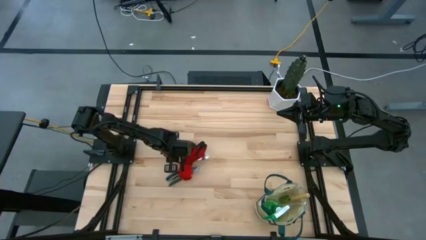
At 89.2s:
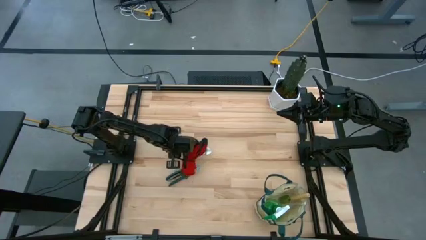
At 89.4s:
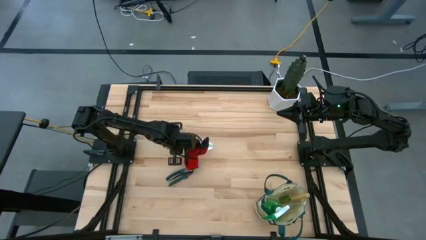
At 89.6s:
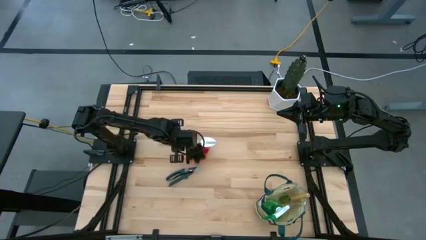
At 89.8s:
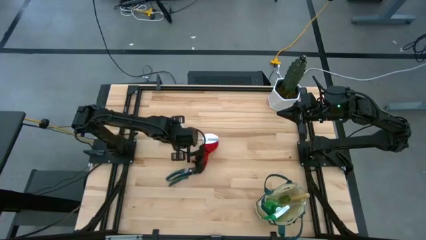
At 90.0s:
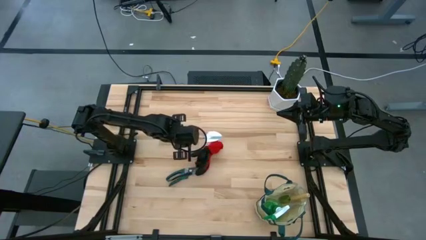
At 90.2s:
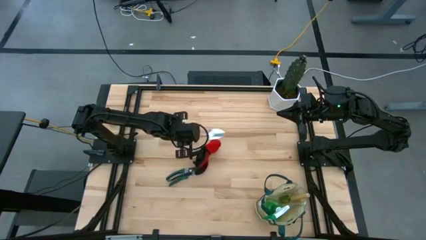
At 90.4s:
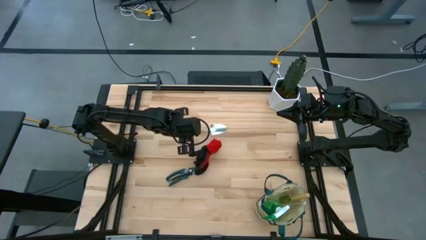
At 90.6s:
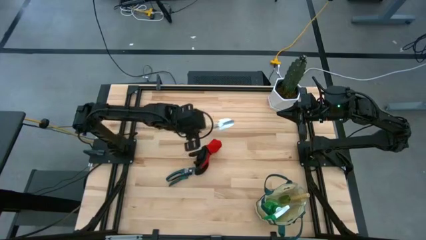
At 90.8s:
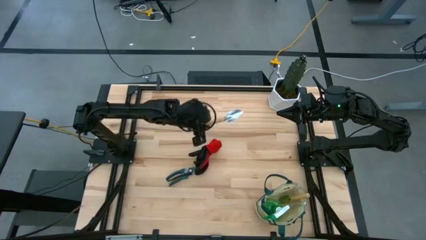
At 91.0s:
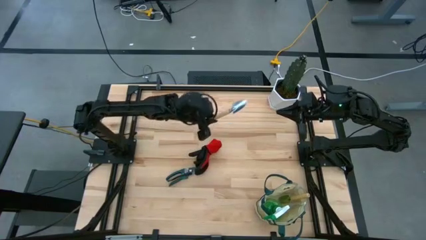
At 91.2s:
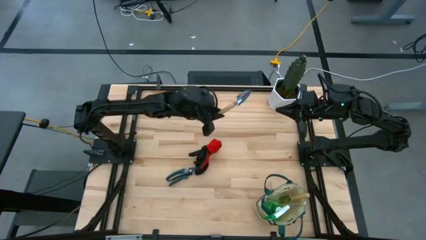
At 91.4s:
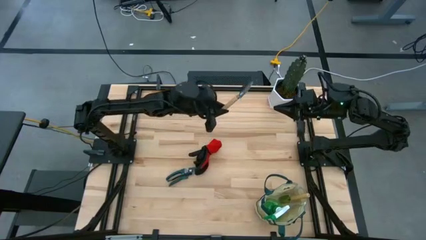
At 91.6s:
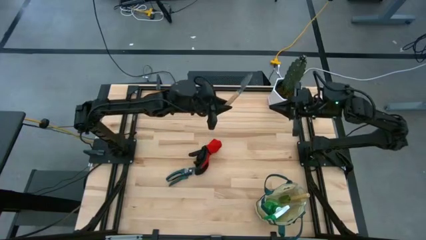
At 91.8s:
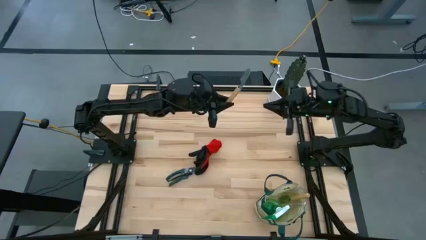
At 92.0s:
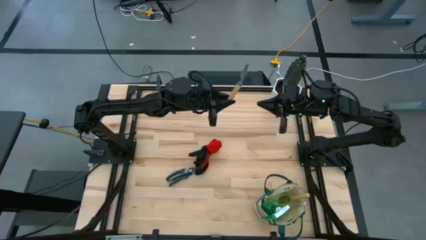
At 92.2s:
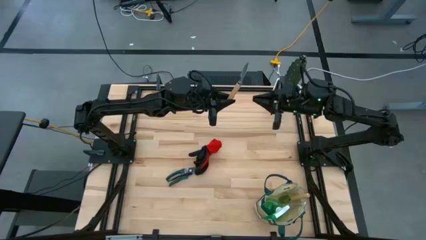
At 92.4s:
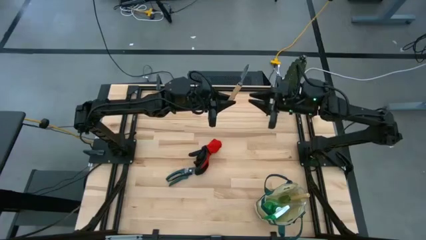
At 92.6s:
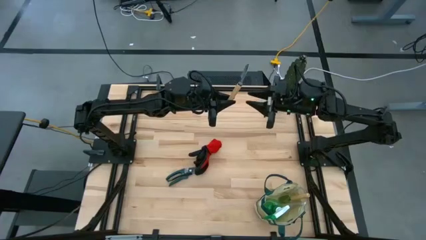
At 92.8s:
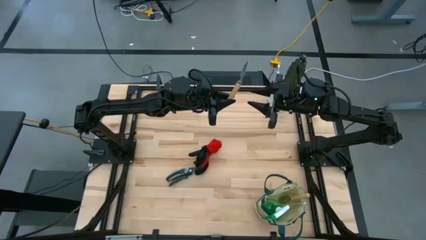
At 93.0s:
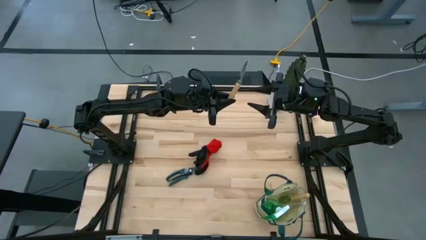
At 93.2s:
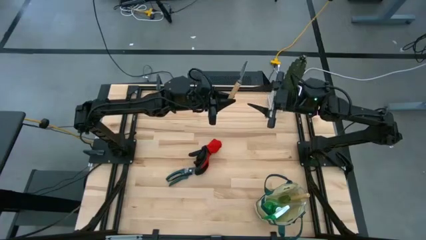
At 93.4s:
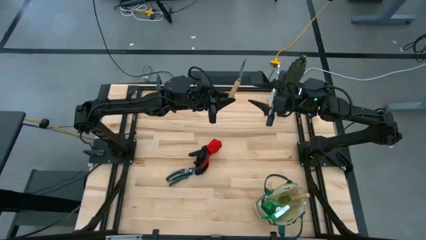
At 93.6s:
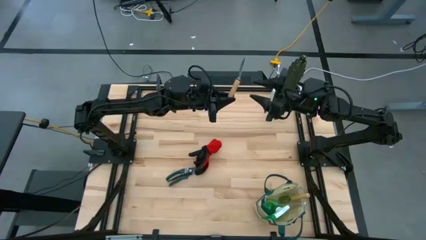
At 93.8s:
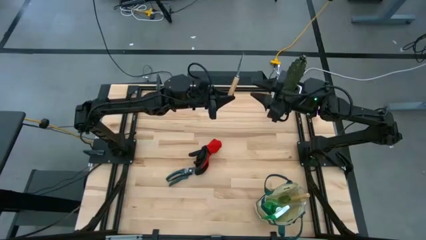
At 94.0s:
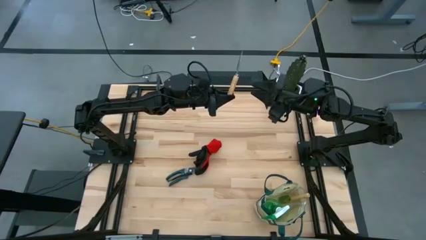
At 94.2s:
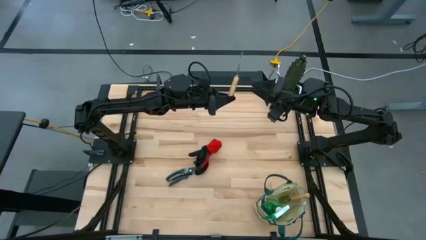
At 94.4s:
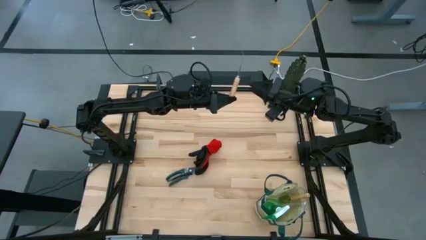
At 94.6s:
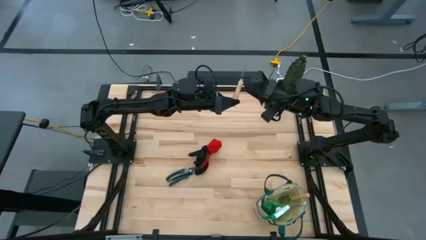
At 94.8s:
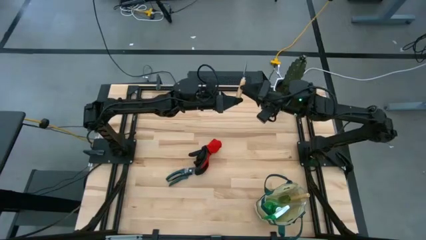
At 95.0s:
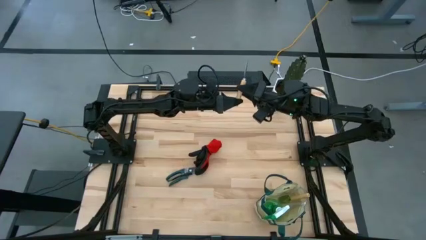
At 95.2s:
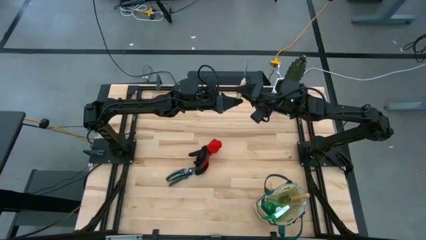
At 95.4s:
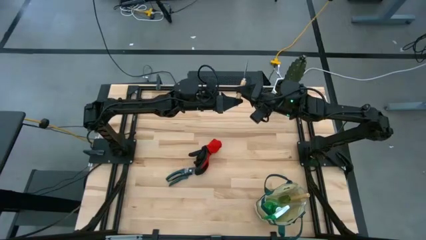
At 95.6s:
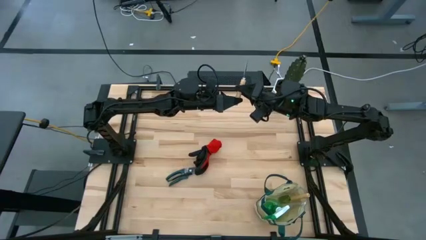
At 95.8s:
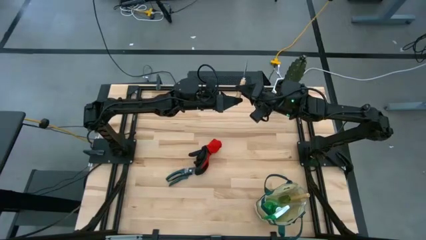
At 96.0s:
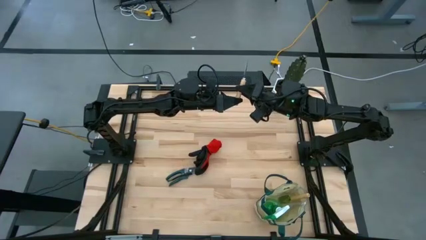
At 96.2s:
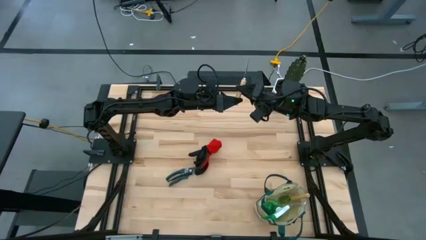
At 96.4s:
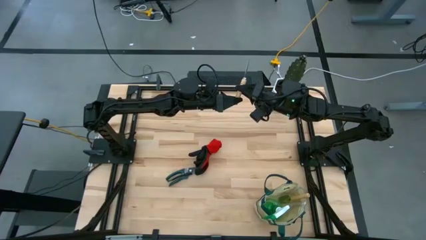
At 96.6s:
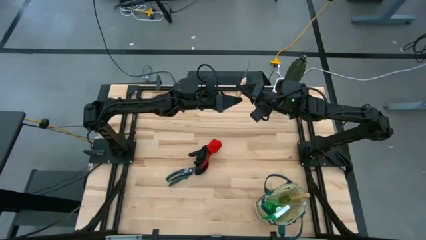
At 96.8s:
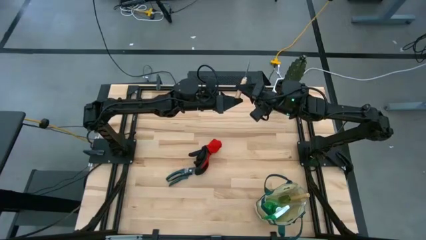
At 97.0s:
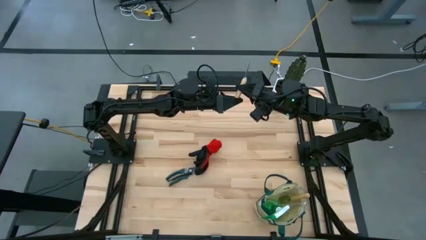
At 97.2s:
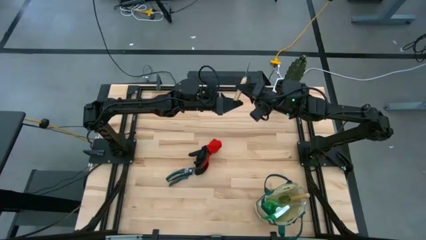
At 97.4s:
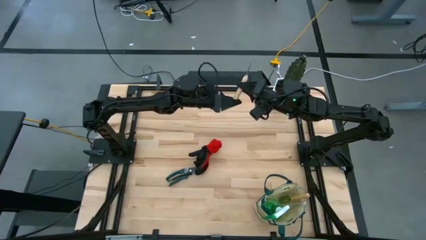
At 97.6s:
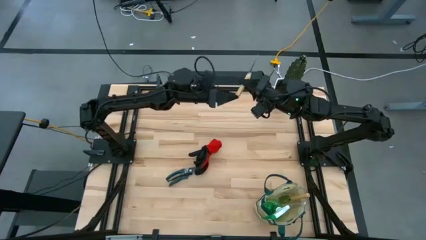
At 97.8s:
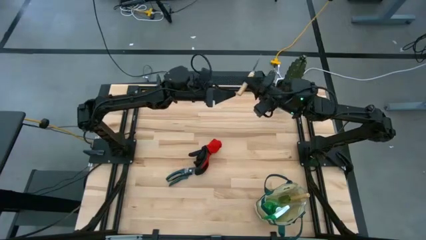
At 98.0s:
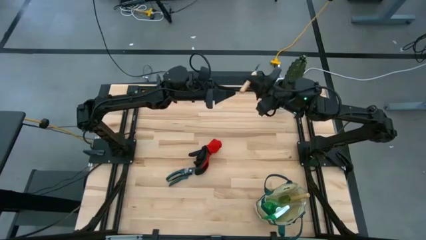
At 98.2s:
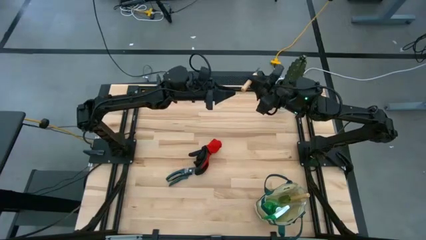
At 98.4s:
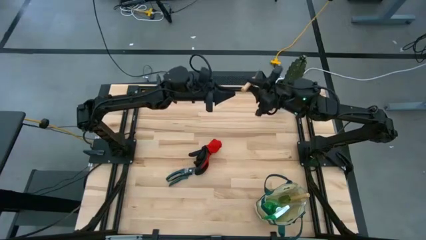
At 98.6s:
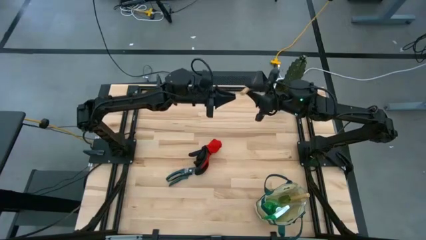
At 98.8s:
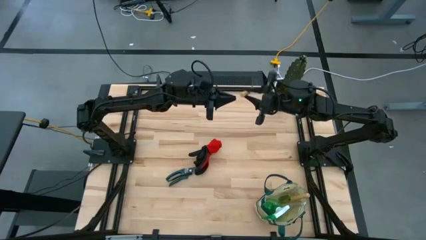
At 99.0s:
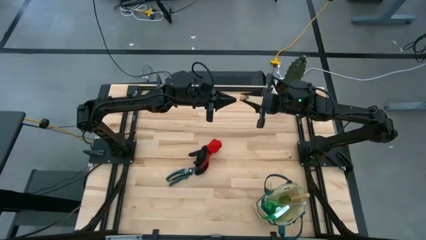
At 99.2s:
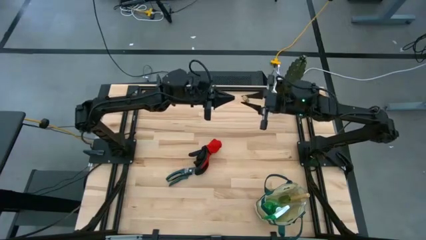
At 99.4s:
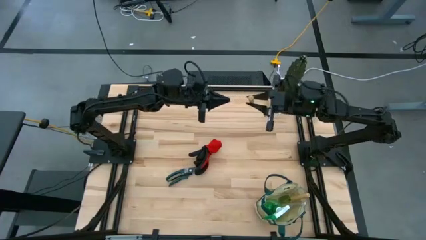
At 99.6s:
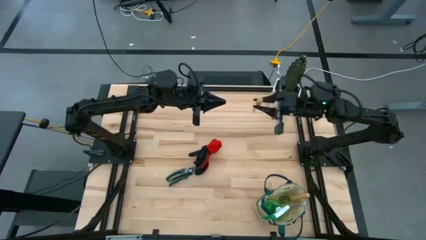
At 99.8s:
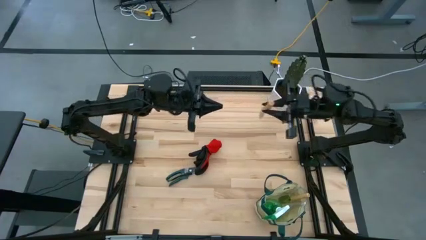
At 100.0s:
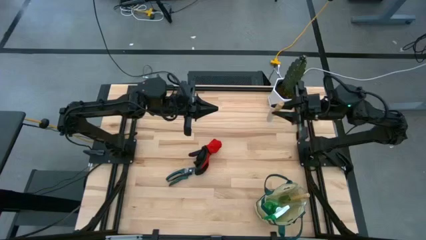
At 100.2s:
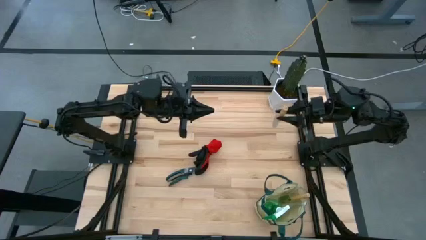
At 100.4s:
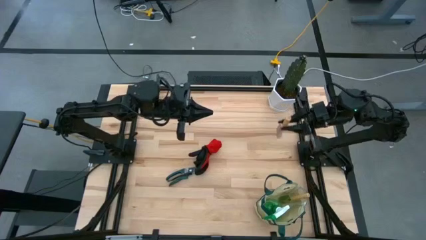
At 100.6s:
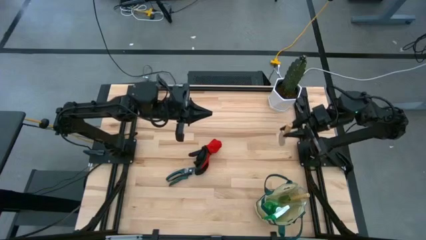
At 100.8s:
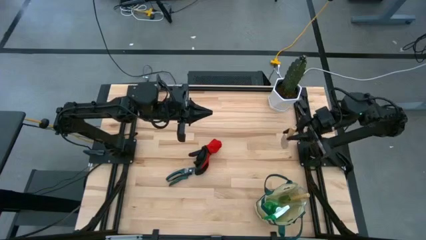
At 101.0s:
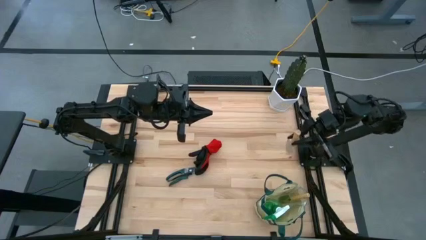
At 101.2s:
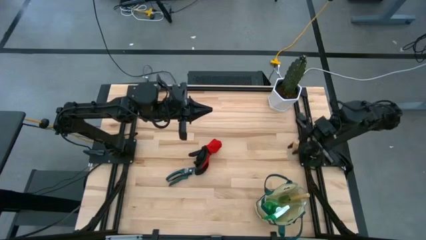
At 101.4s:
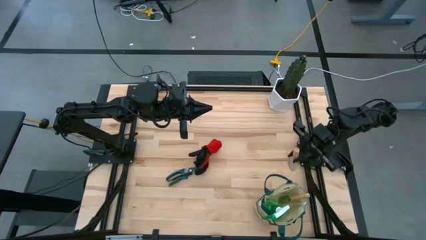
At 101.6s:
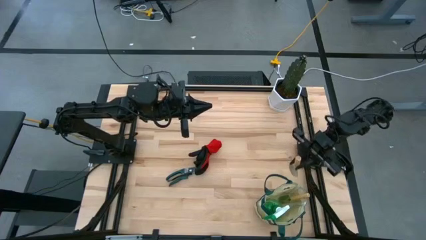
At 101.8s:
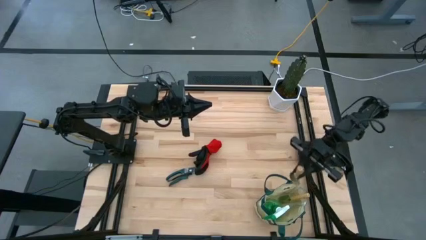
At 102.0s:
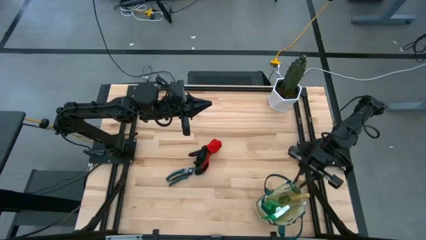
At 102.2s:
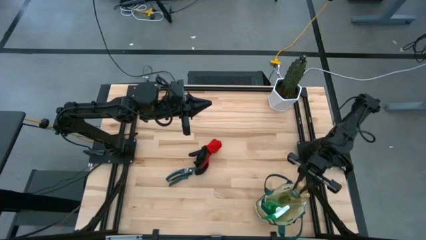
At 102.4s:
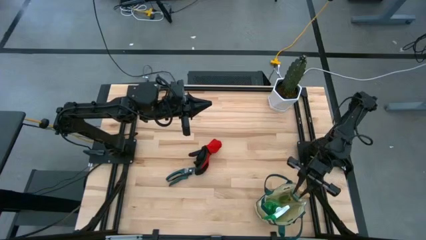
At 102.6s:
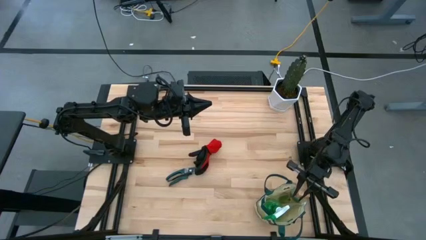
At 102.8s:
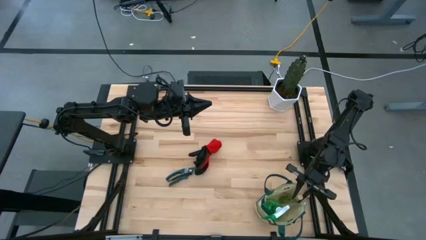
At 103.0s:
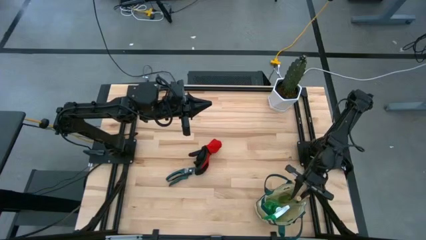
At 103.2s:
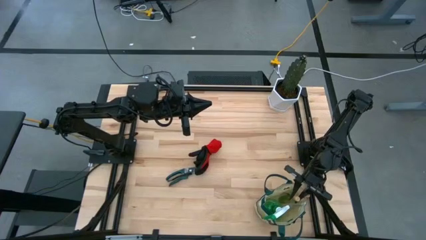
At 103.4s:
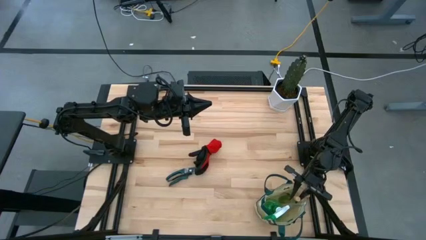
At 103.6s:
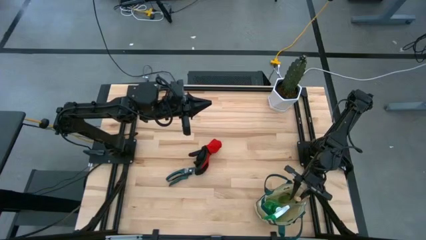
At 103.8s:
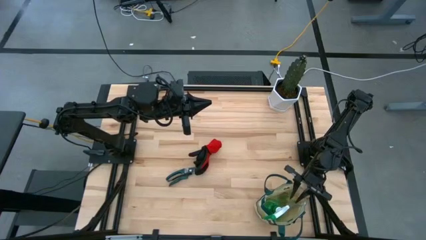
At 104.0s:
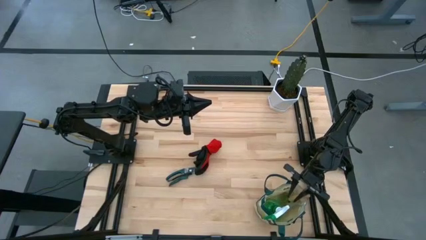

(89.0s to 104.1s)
Task: Pick & Place Garden tools in Gardening bag
Put the light brown trowel into the gardening tool bag

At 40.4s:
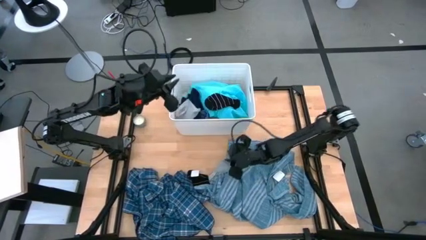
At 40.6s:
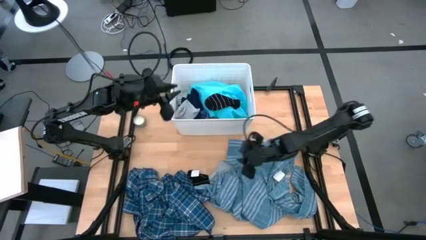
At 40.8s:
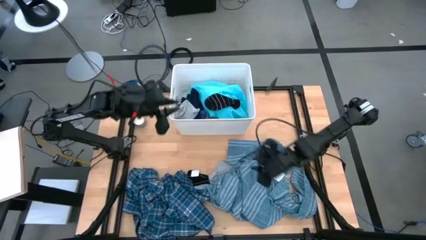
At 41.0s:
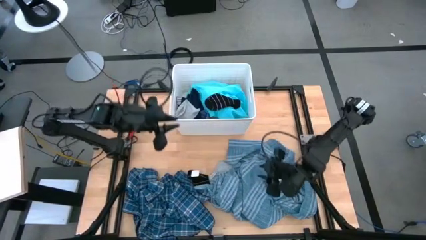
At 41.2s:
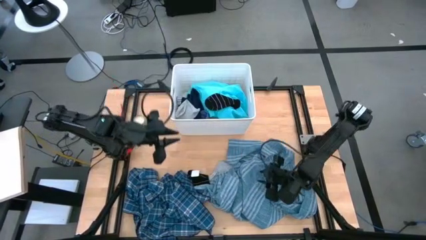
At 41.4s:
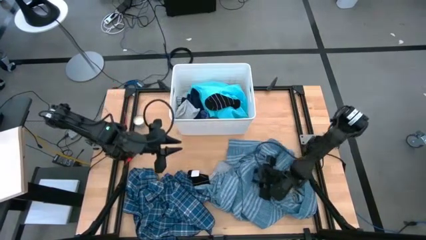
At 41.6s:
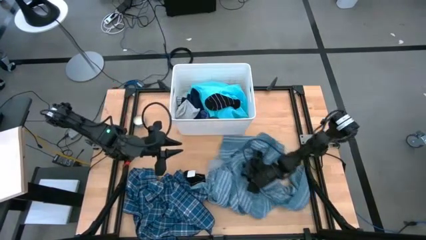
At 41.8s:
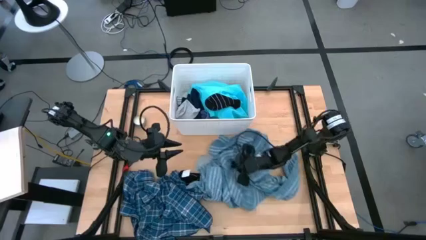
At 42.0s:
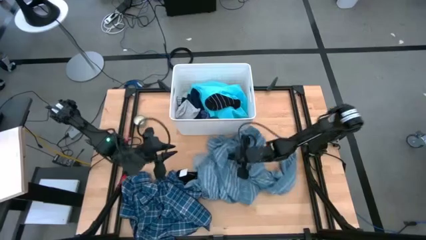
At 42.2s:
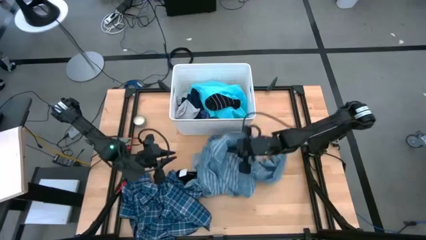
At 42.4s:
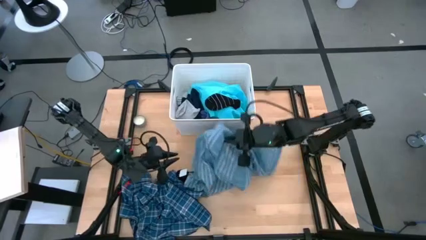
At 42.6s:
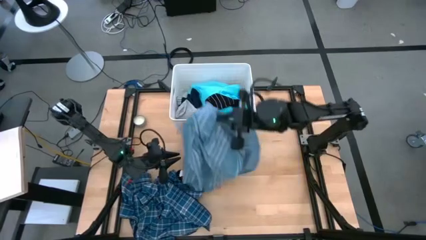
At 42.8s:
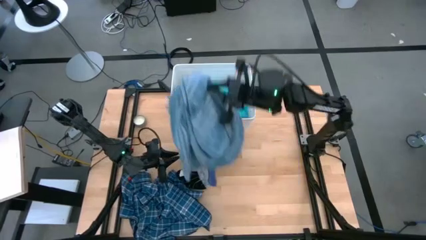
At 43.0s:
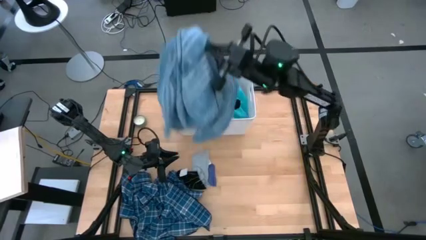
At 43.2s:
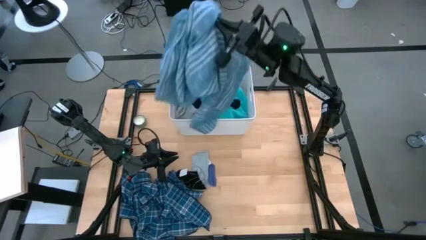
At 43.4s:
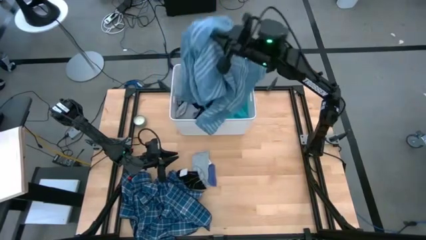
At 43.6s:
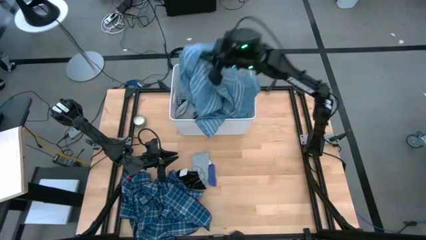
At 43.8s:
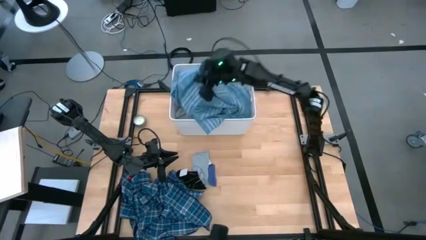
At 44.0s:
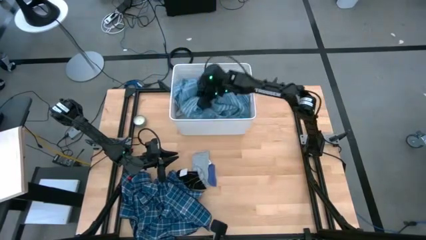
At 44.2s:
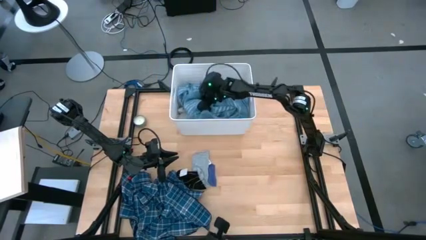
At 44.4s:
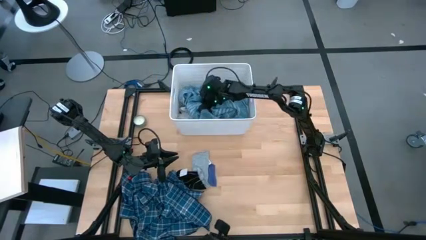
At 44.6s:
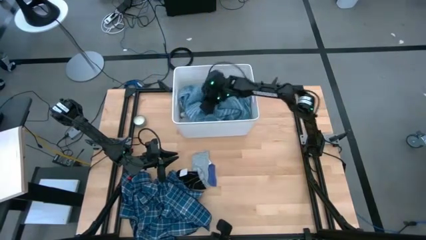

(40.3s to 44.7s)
Task: Sort clothes
Put the light blue plaid shirt into the white bin
